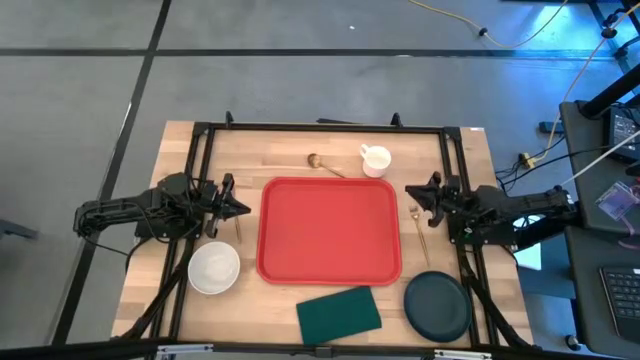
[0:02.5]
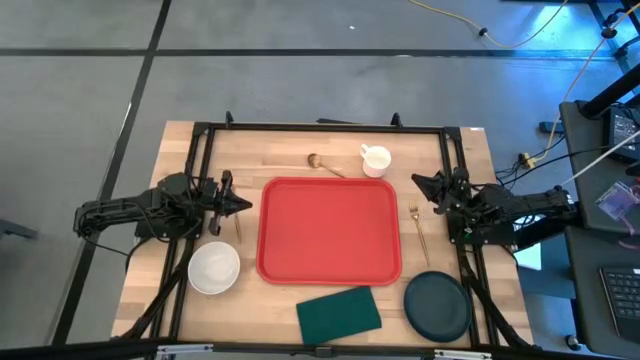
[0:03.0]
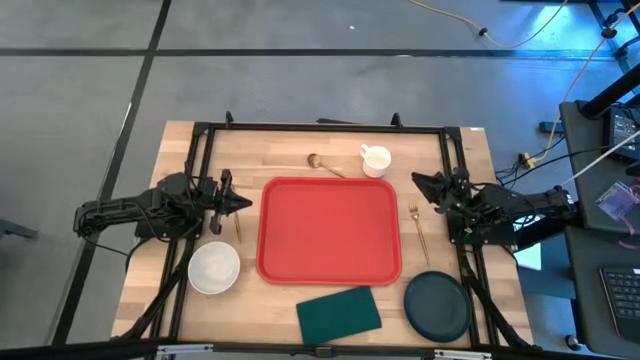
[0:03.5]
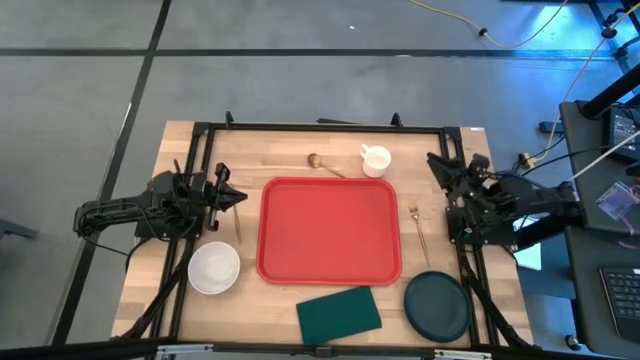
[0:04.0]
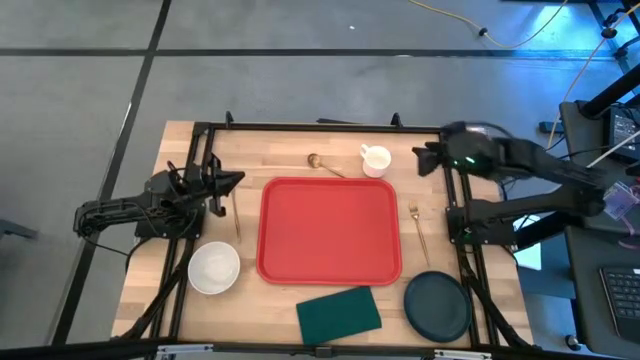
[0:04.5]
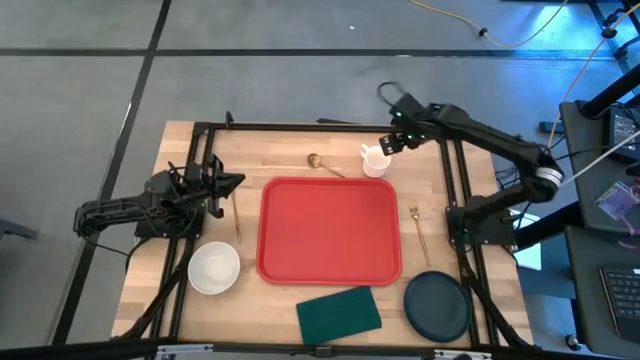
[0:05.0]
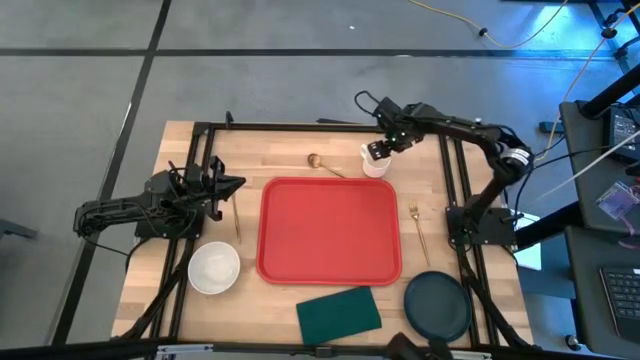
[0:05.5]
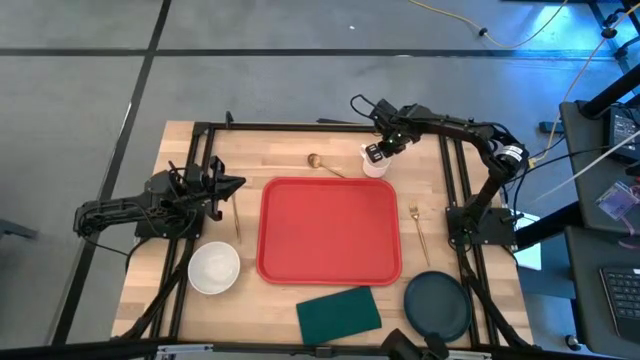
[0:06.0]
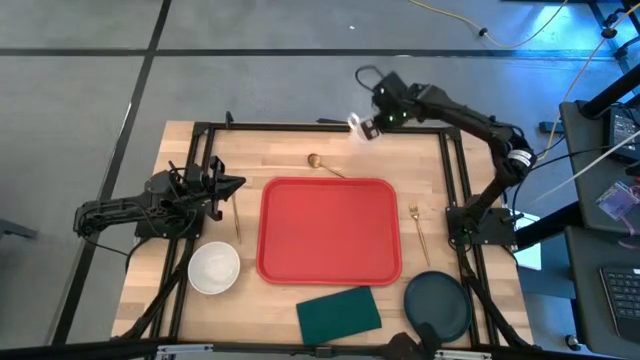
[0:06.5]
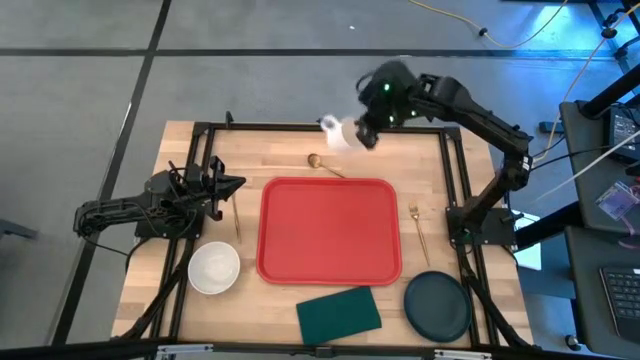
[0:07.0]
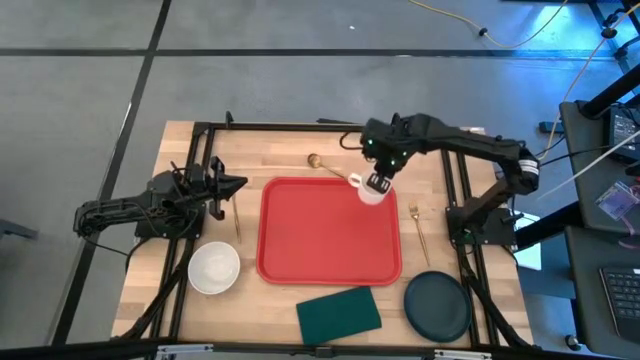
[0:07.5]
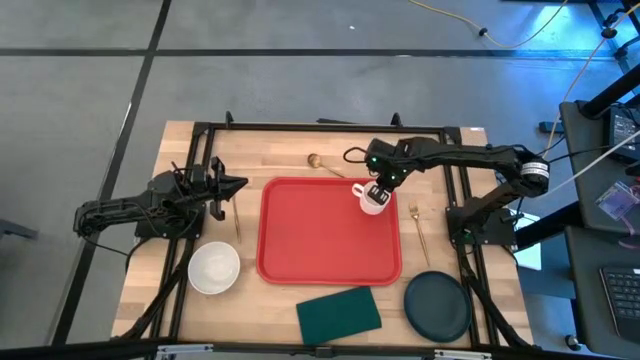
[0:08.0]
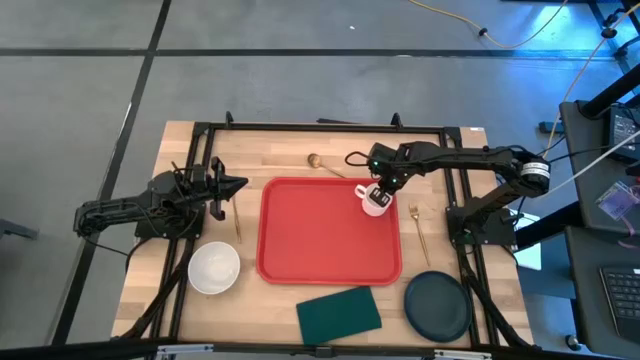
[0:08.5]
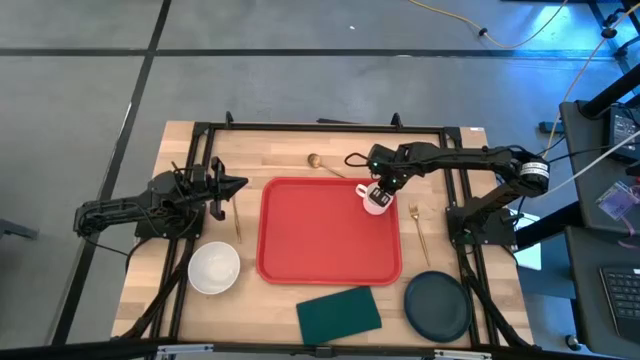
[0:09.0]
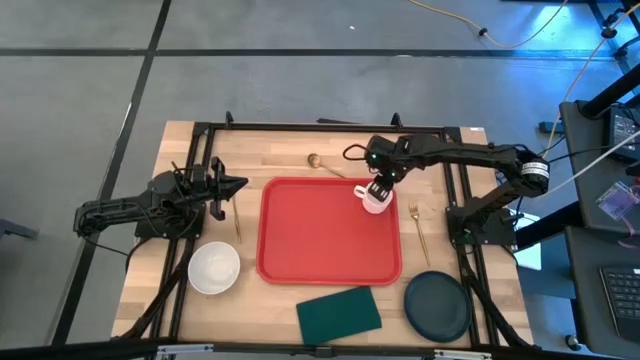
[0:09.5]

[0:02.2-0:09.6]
Task: Set up tray
Put the white mug on the orange tray

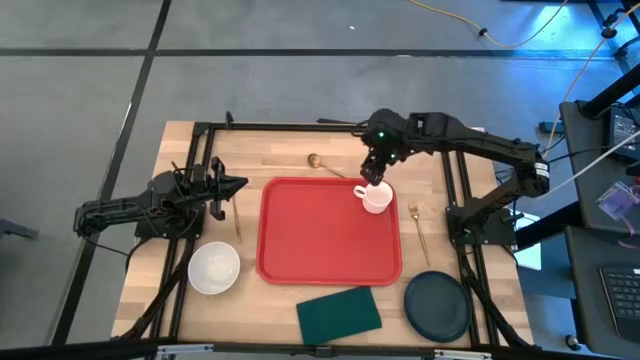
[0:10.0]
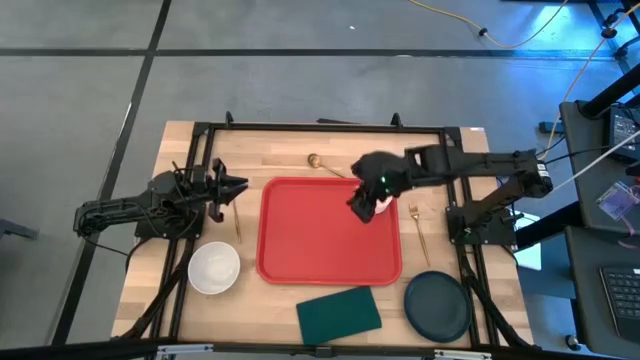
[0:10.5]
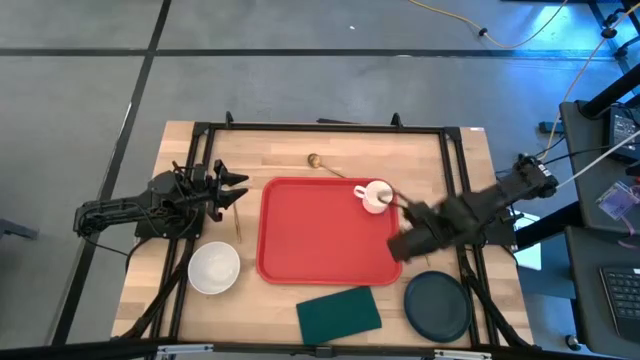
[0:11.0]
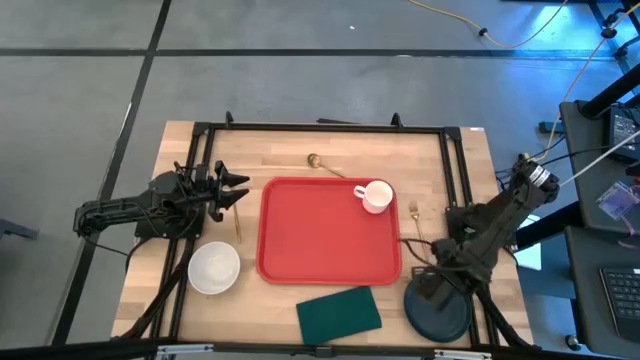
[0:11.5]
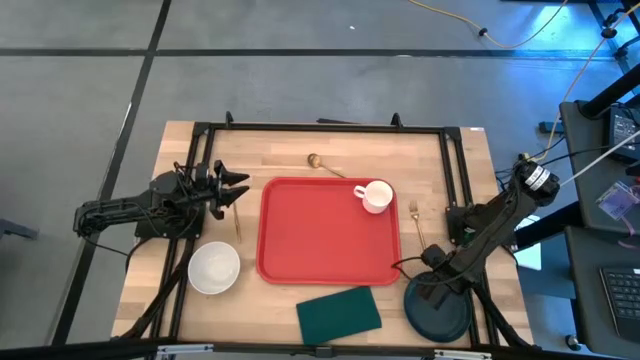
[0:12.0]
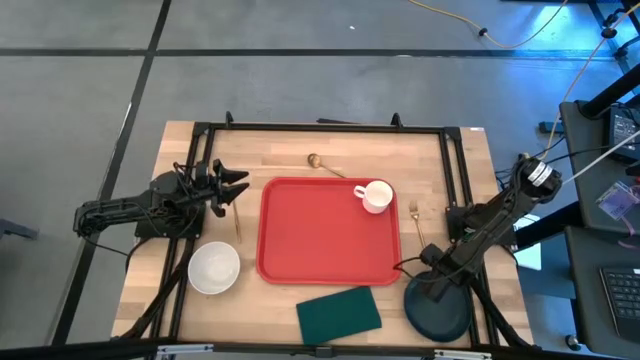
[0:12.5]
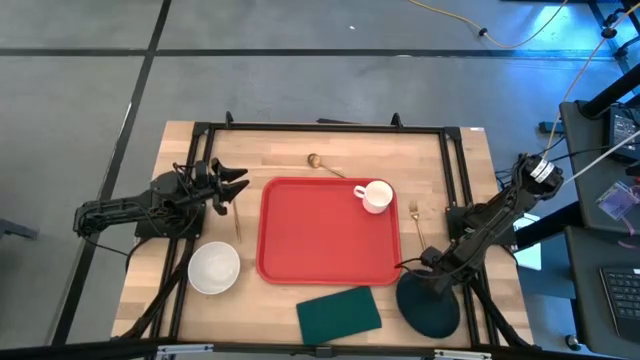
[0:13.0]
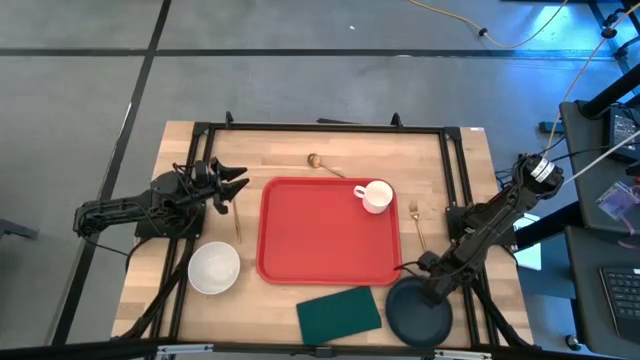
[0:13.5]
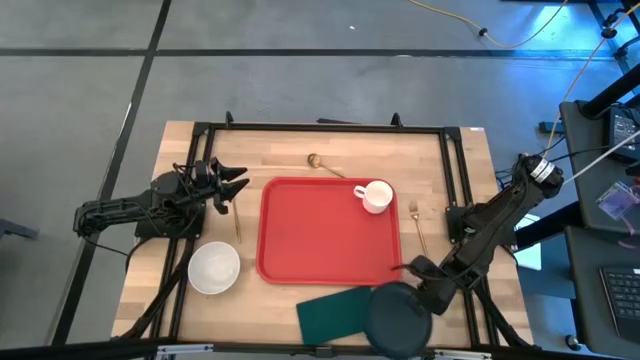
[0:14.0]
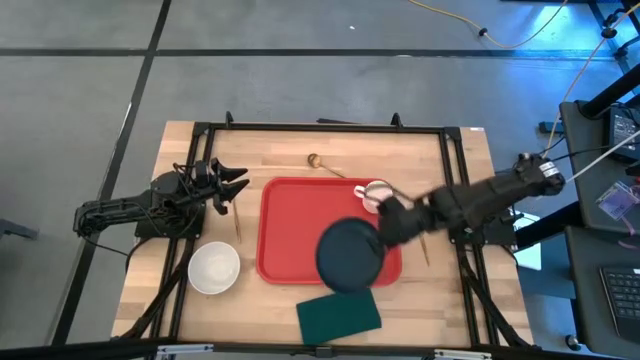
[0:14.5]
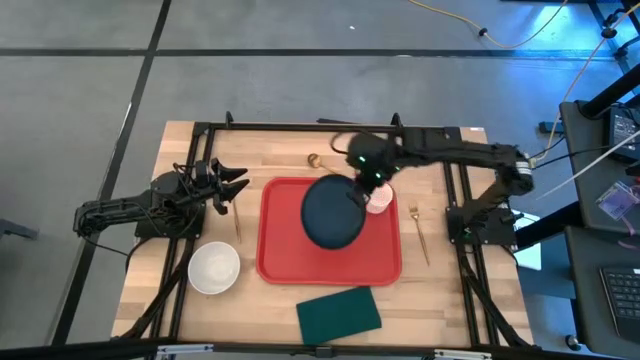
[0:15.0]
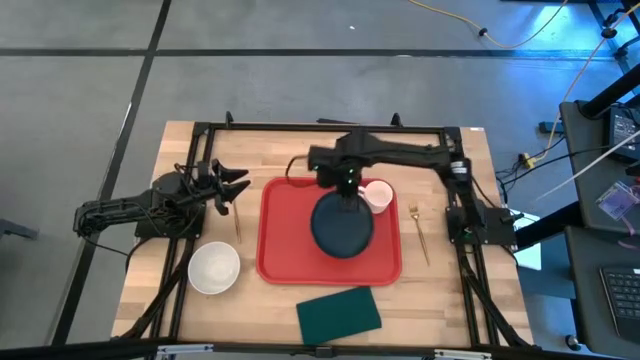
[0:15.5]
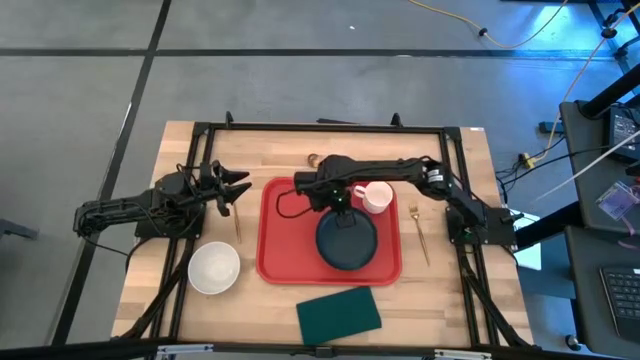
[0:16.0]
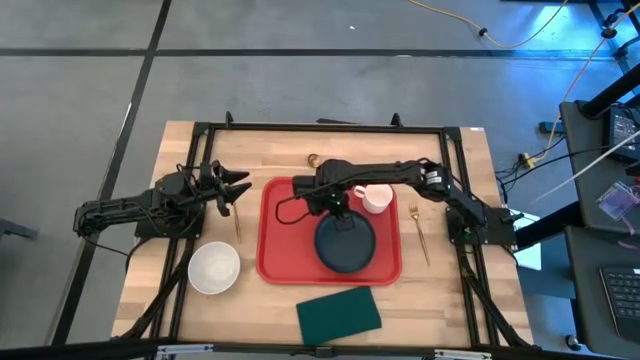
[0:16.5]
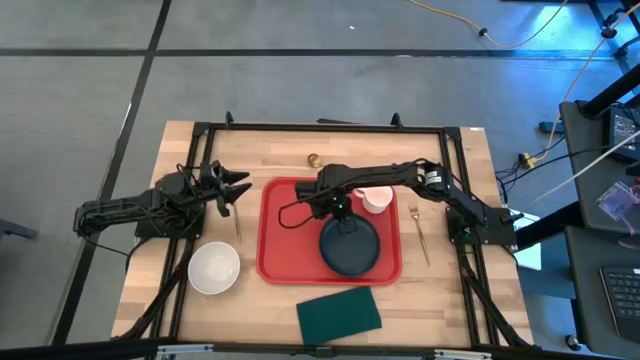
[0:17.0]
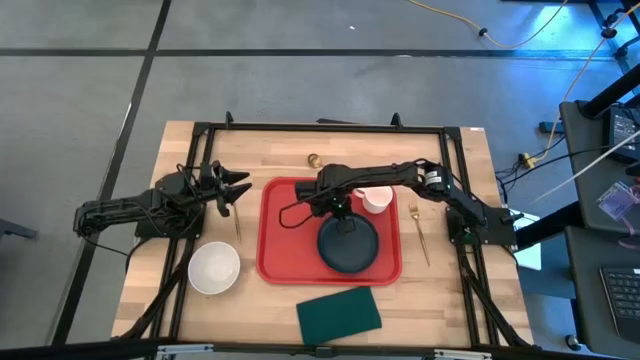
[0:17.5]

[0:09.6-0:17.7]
Put the black plate on the orange tray to the bottom left of the white mug

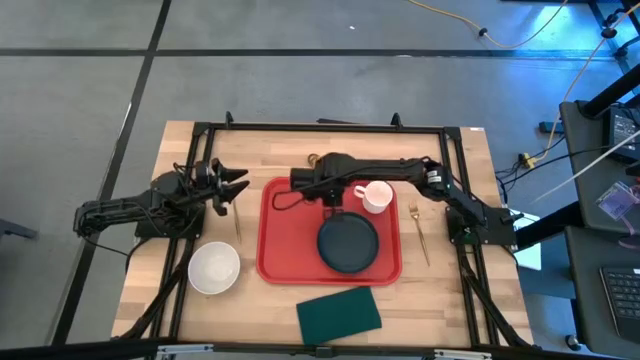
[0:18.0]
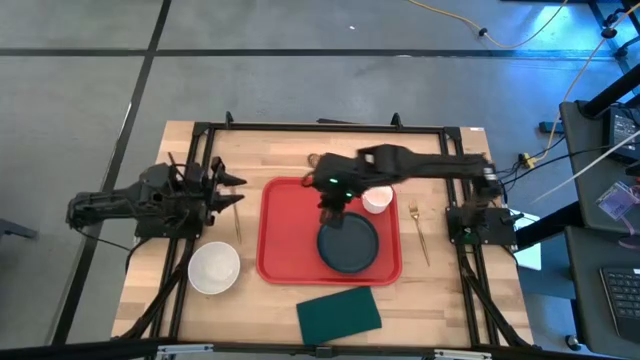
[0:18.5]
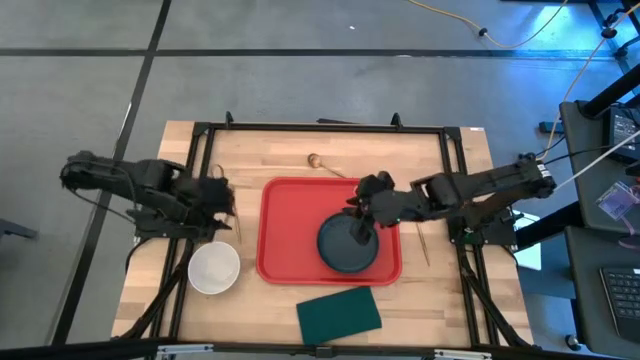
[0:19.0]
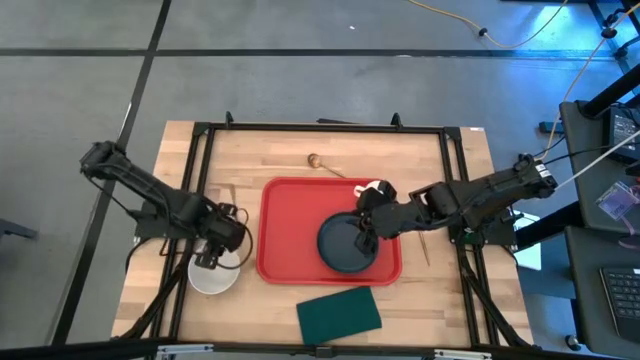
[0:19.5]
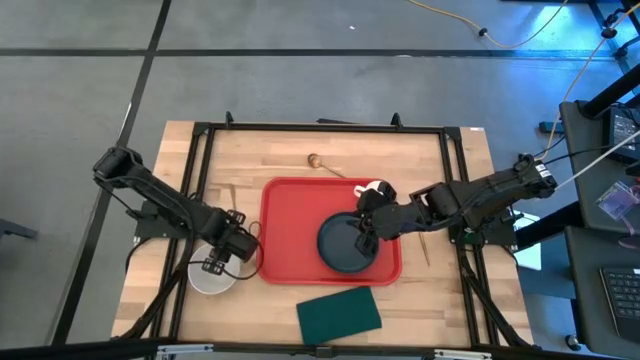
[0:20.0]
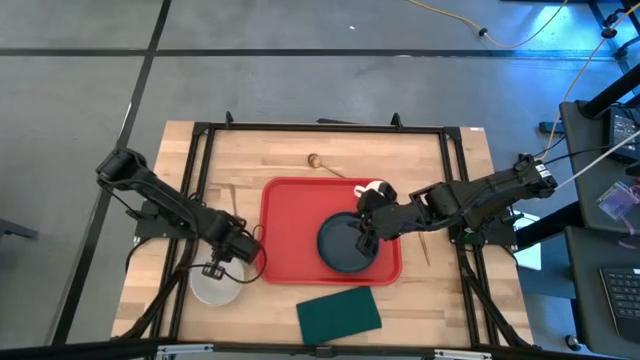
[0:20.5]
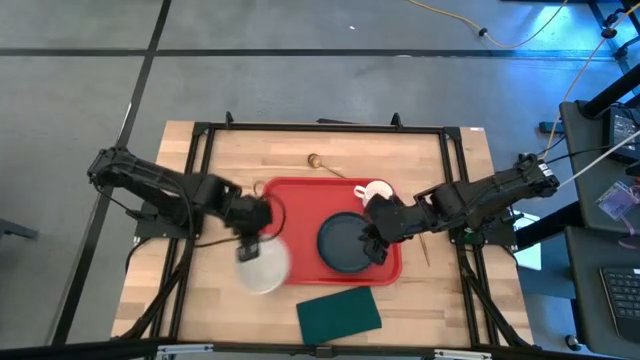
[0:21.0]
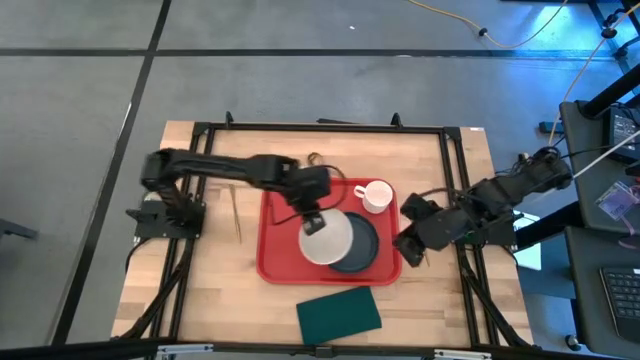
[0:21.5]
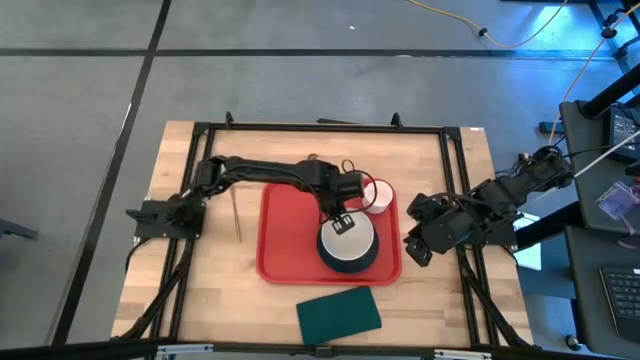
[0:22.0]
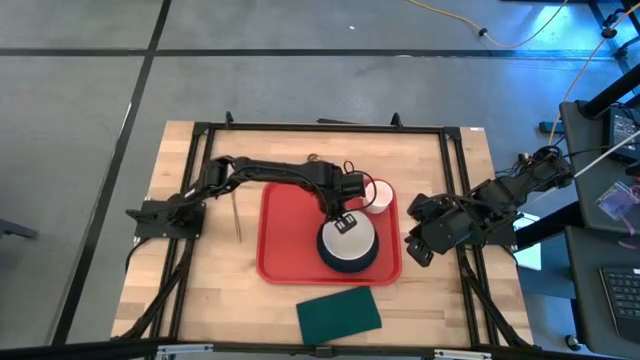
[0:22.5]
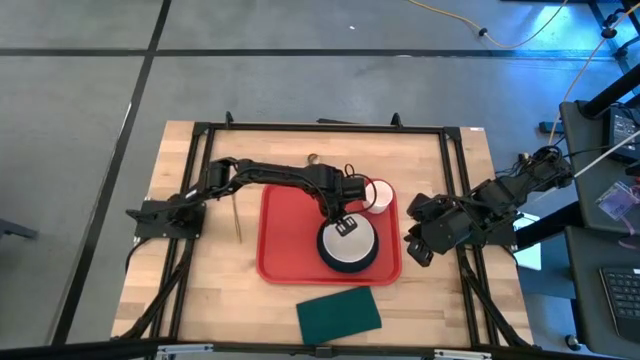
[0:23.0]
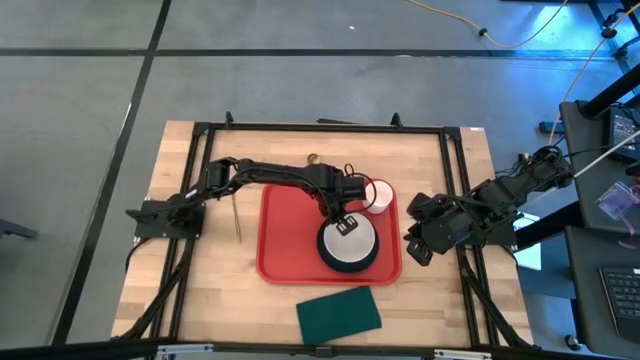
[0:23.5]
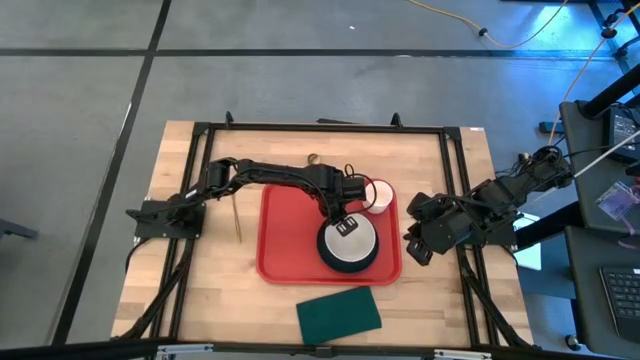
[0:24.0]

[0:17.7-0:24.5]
Put the white bowl on the black plate on the orange tray
